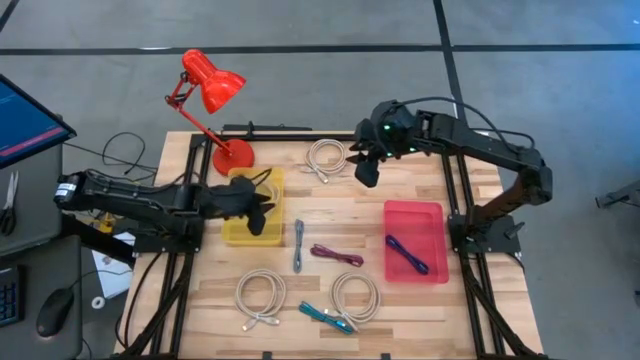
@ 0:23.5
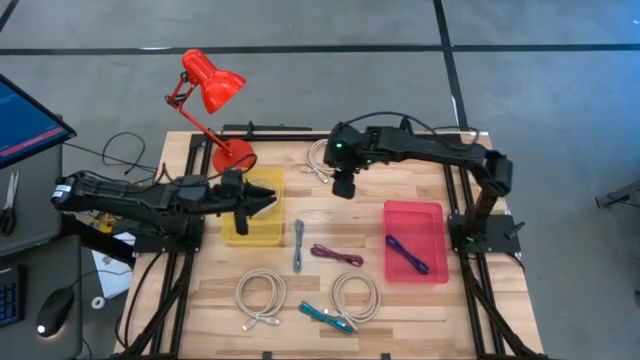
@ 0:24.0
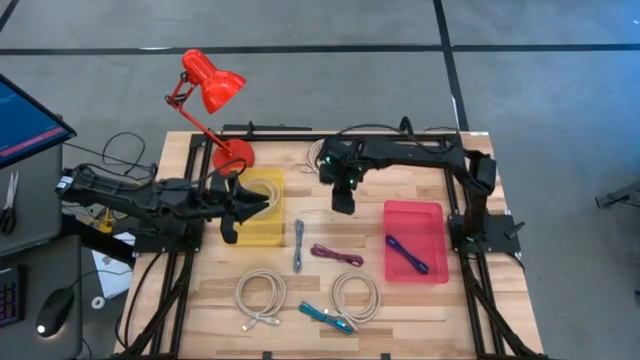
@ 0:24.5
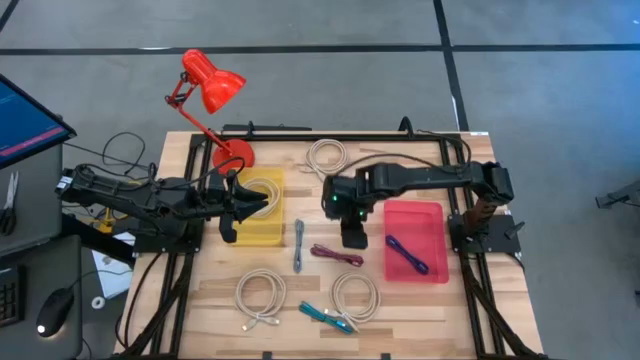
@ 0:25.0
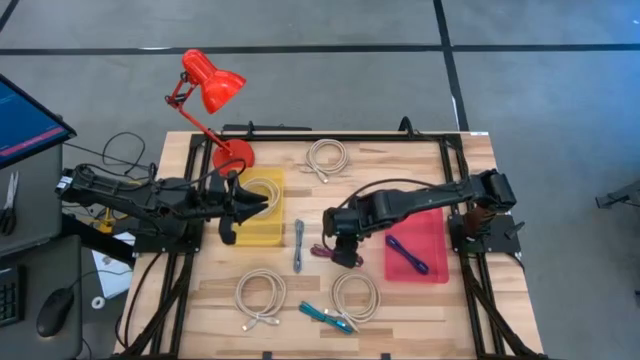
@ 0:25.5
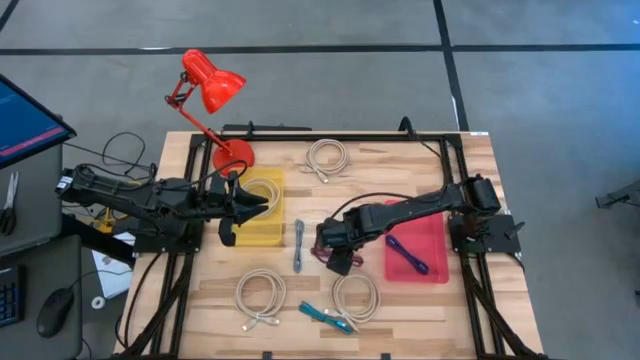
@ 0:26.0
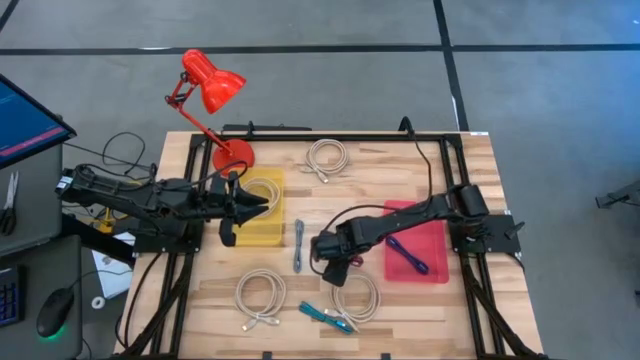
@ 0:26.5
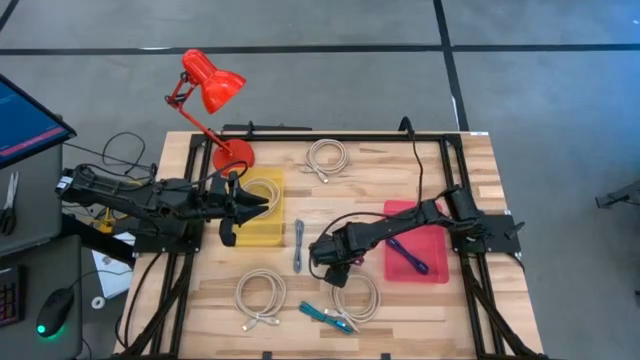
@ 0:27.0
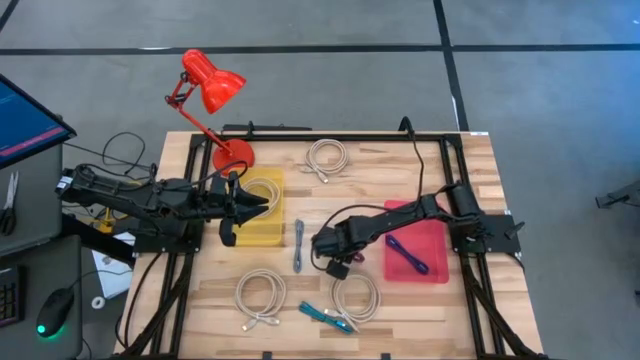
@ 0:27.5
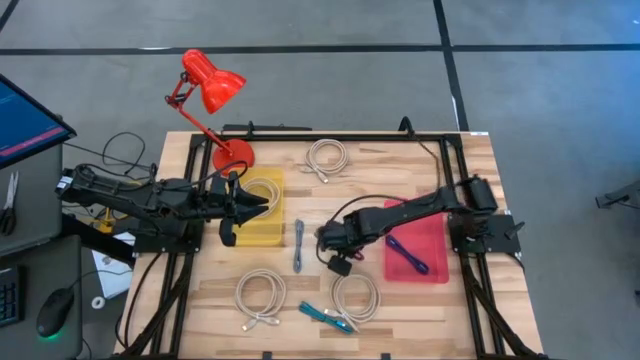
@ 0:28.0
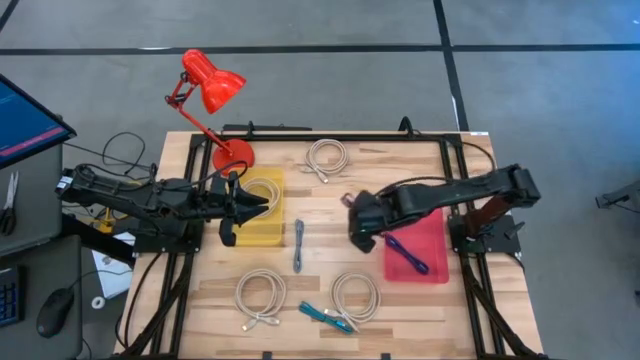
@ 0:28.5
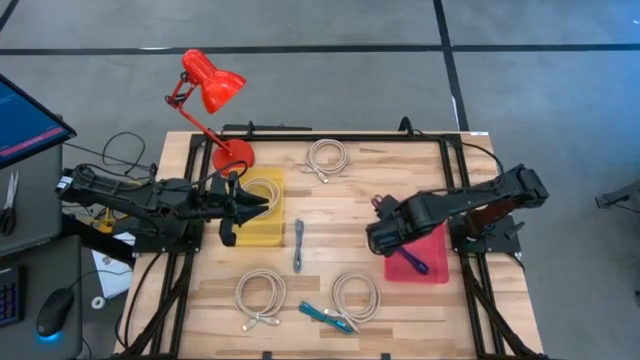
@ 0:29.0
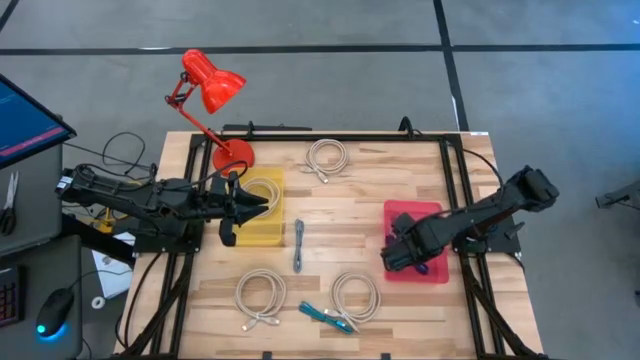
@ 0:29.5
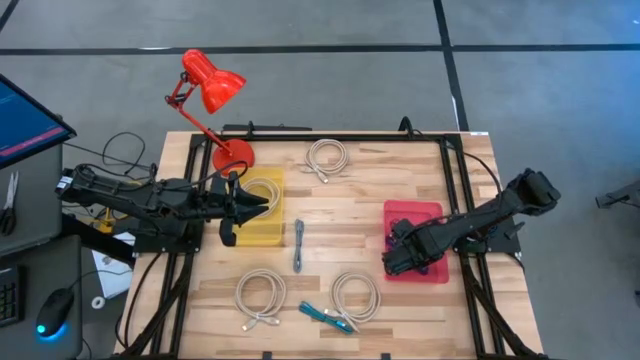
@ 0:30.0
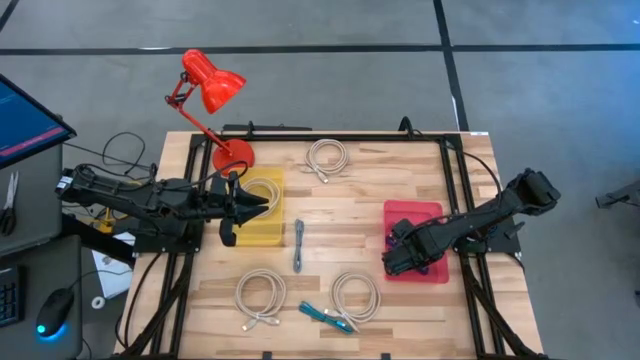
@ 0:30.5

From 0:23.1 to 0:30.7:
Task: Pick & Place USB Port
Put the black and pink charger cable into the pink bin

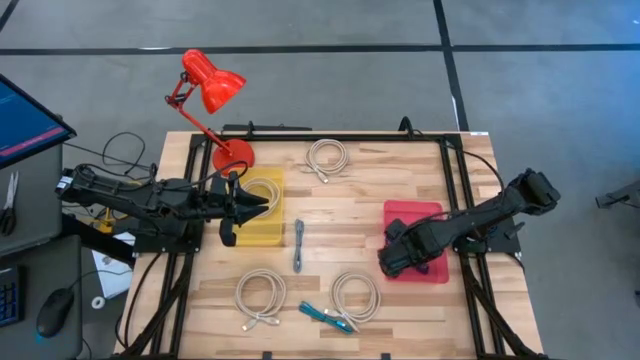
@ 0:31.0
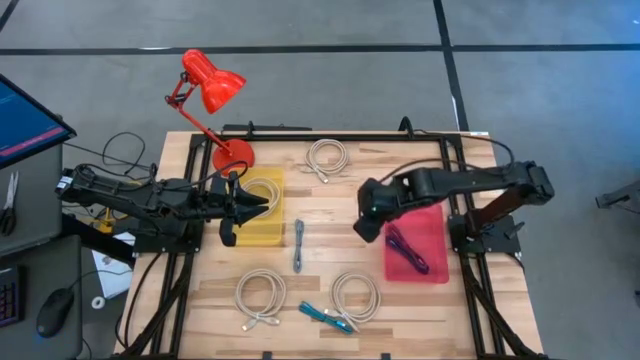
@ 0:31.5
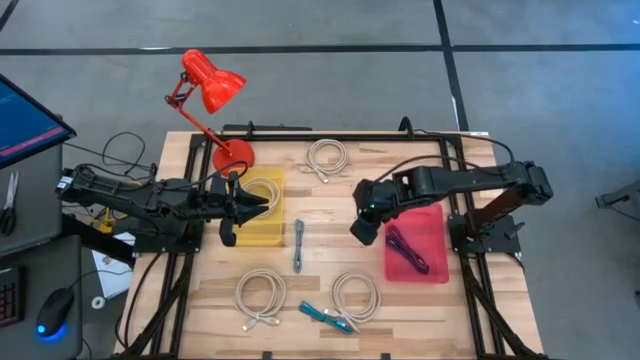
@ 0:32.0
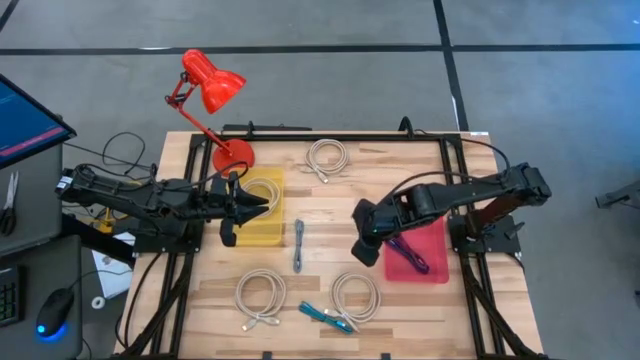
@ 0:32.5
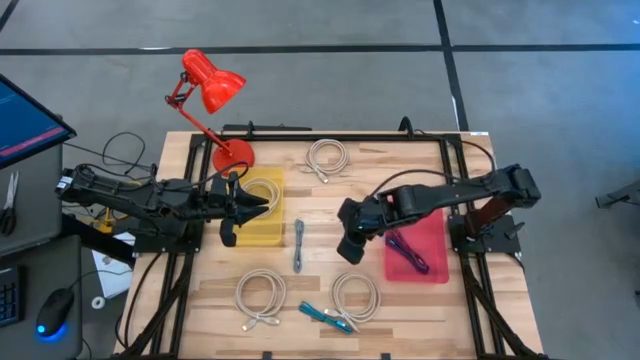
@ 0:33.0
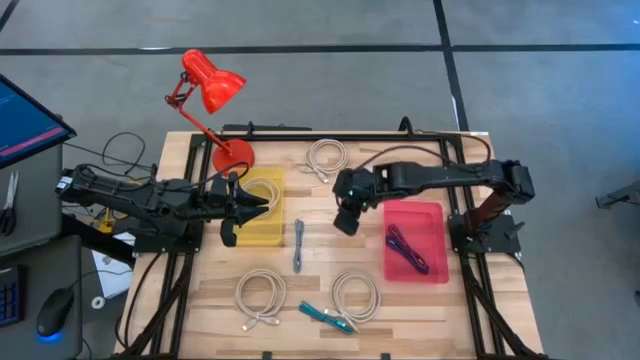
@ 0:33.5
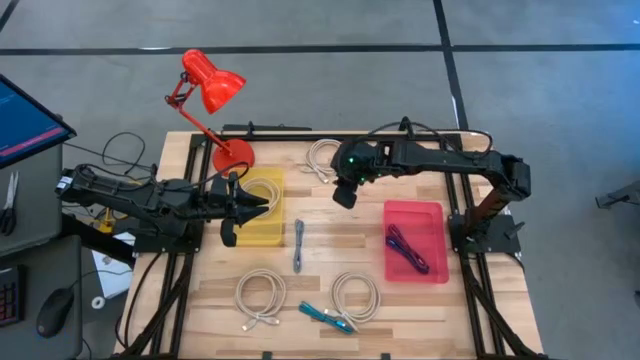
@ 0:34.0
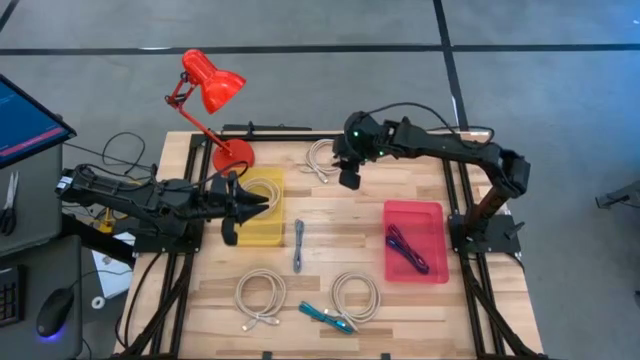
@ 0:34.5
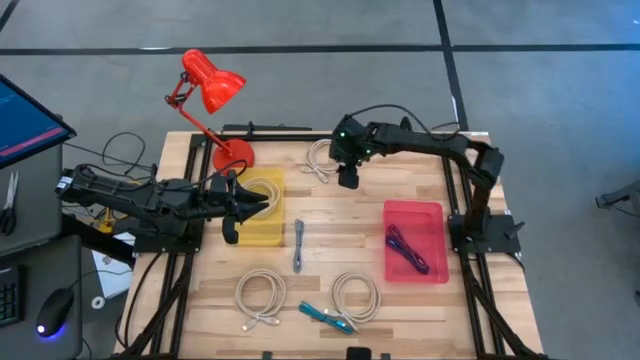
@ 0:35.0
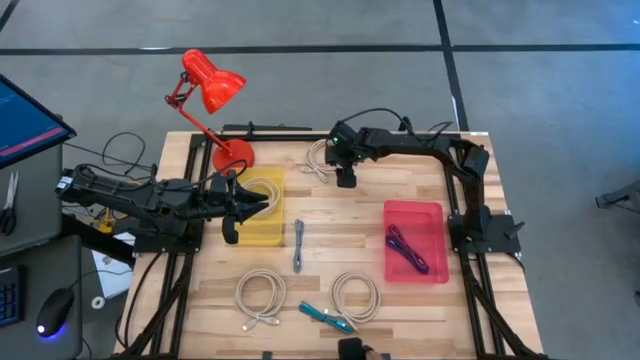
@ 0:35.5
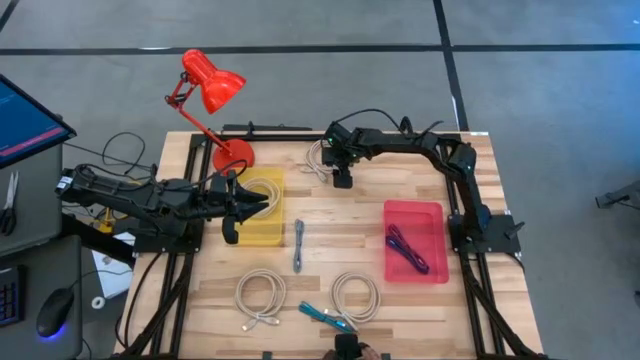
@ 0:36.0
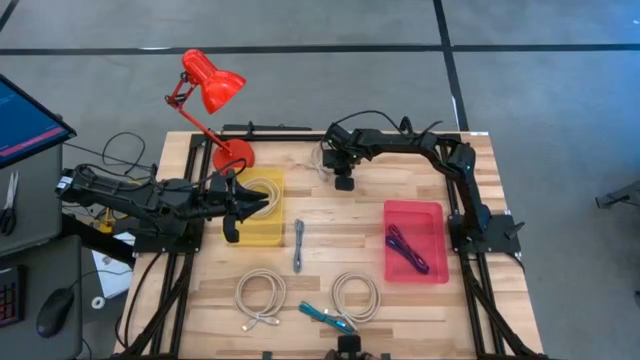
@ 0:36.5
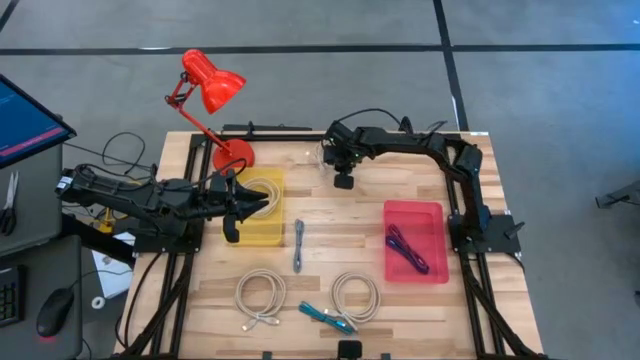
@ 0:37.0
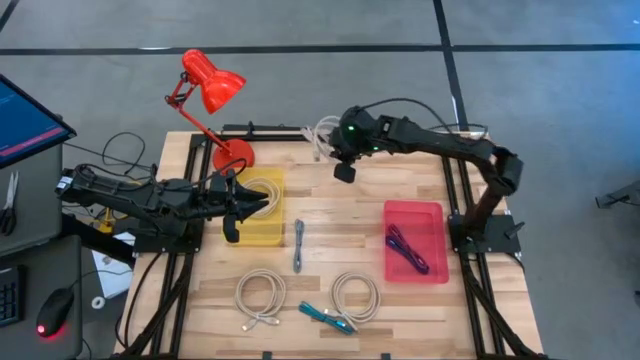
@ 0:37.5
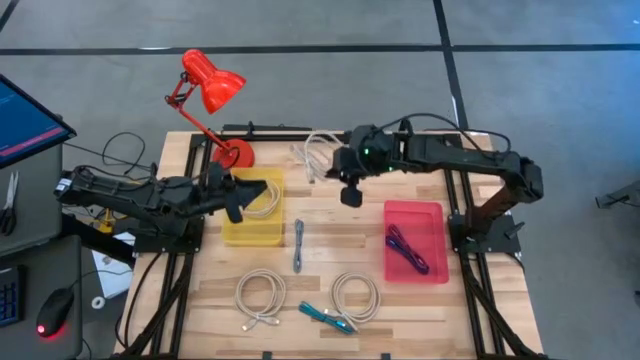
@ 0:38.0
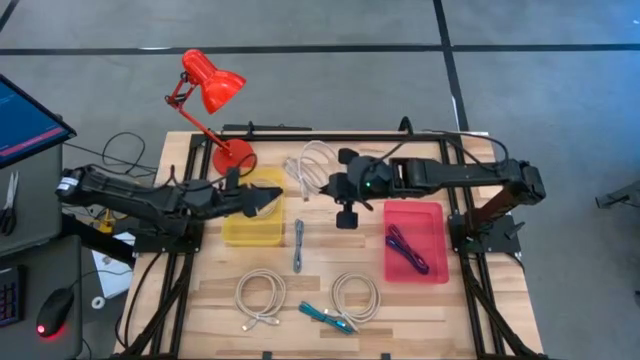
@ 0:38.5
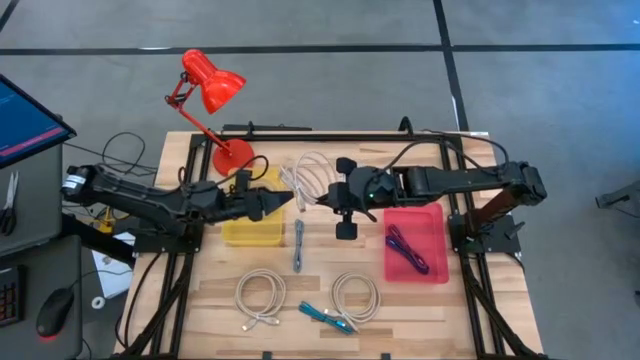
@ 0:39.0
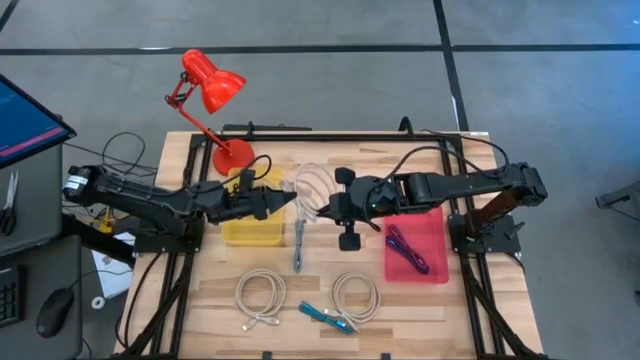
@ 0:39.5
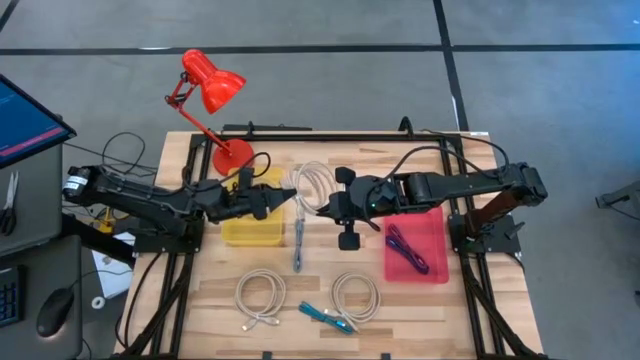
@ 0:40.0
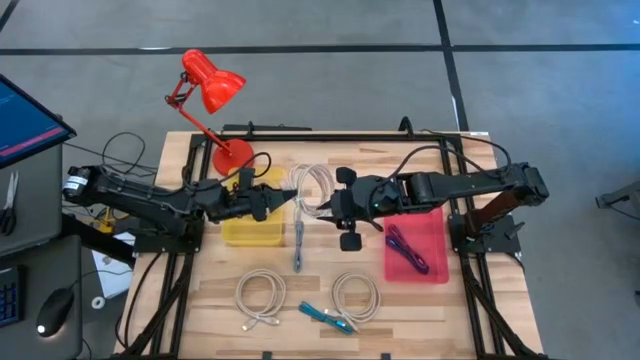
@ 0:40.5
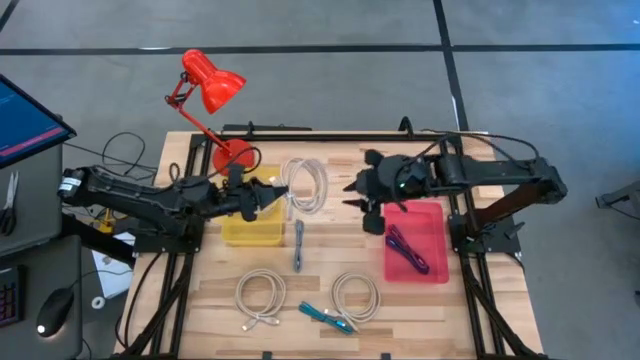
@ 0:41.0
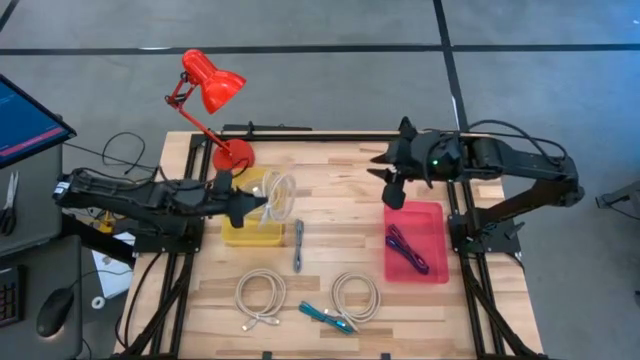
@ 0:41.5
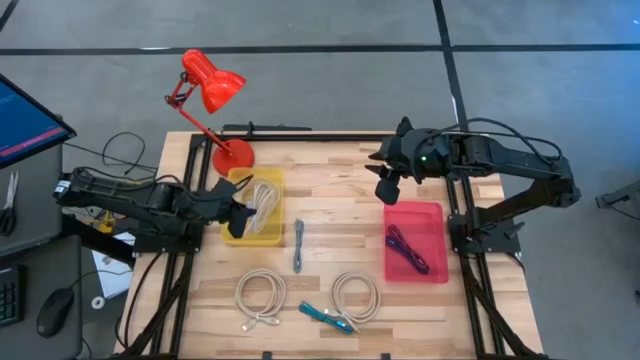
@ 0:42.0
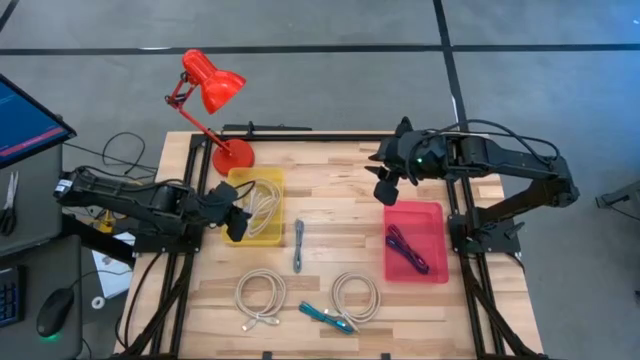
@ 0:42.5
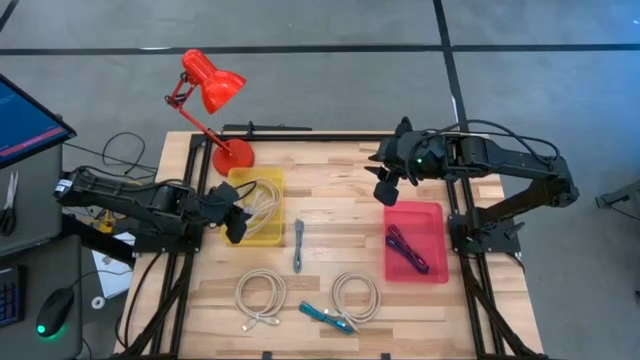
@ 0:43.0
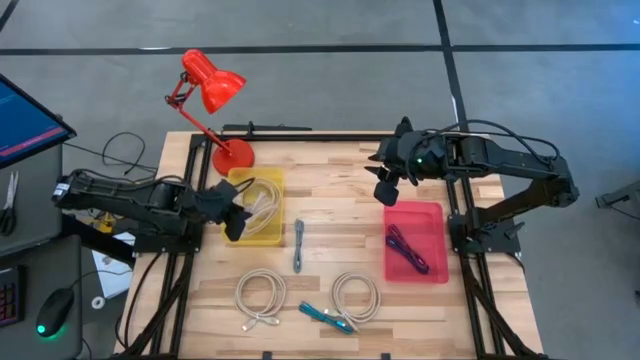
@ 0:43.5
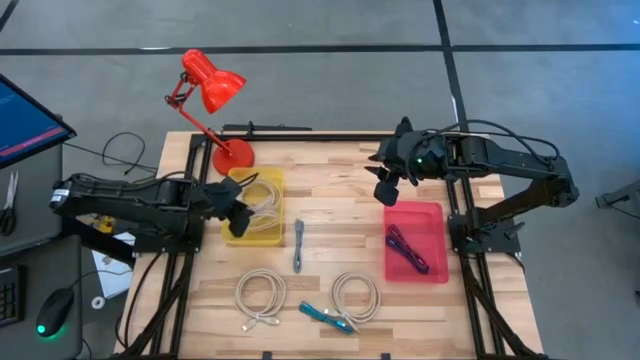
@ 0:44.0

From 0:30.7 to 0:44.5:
Put the brown HDMI cable into the yellow bin
